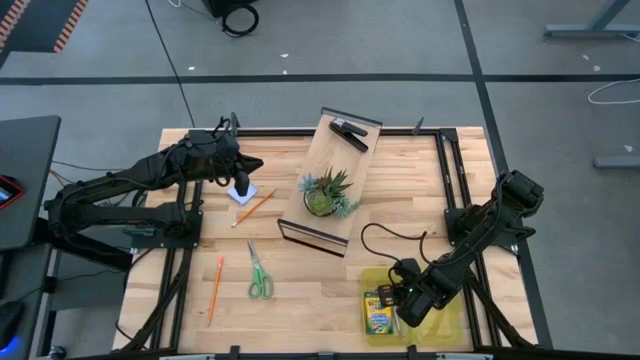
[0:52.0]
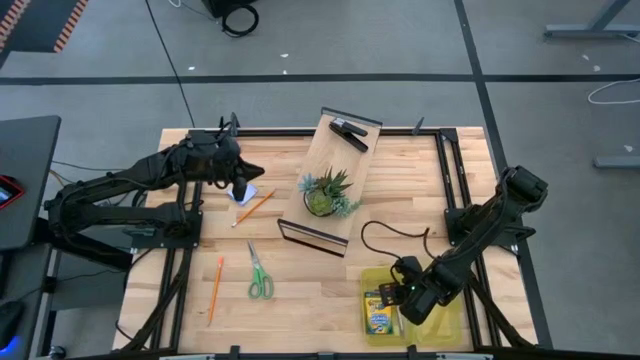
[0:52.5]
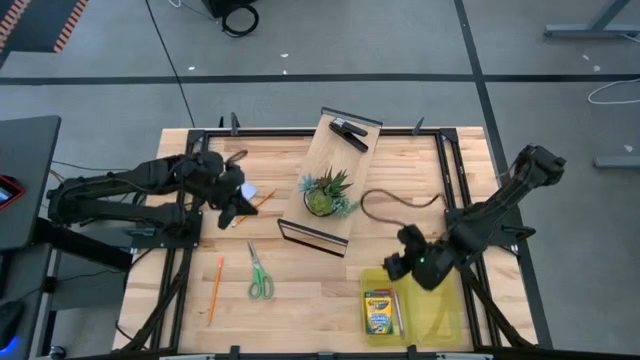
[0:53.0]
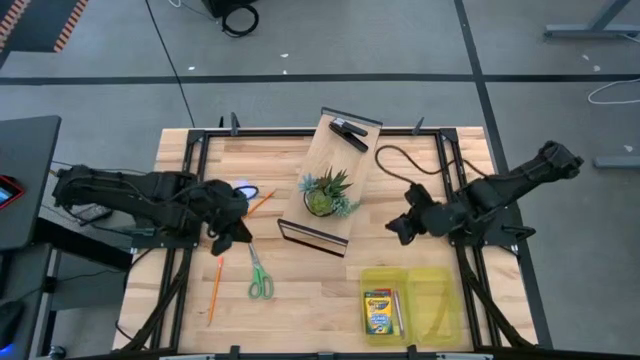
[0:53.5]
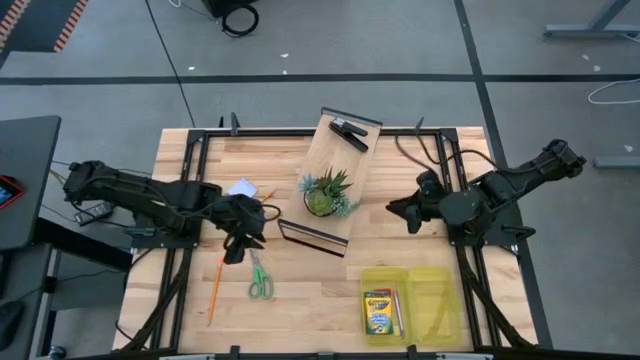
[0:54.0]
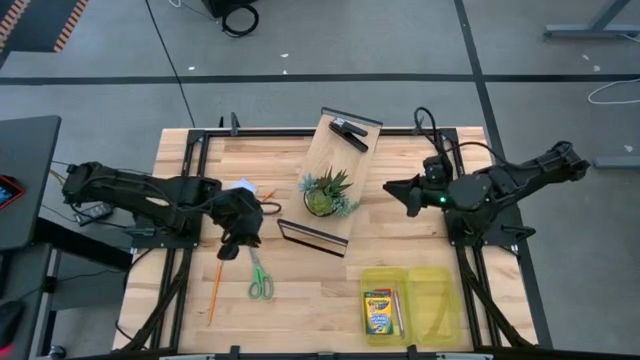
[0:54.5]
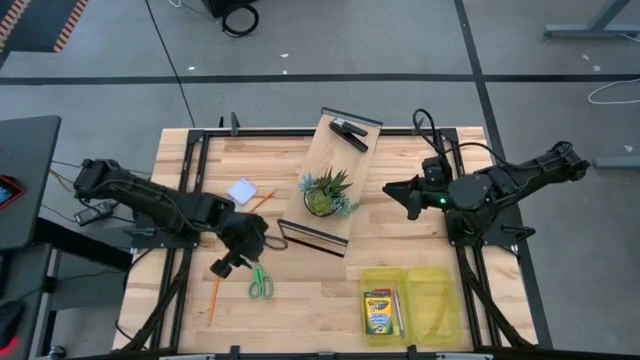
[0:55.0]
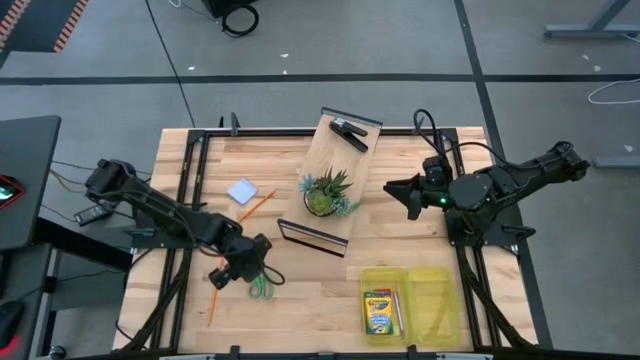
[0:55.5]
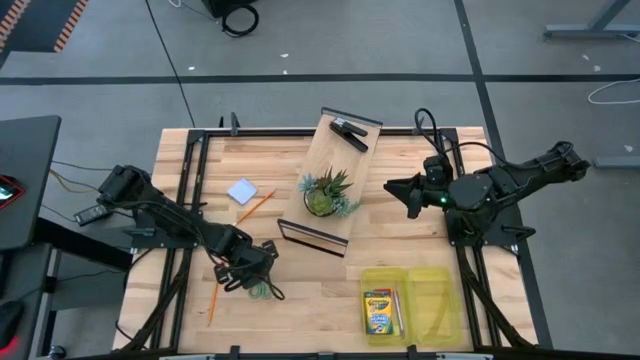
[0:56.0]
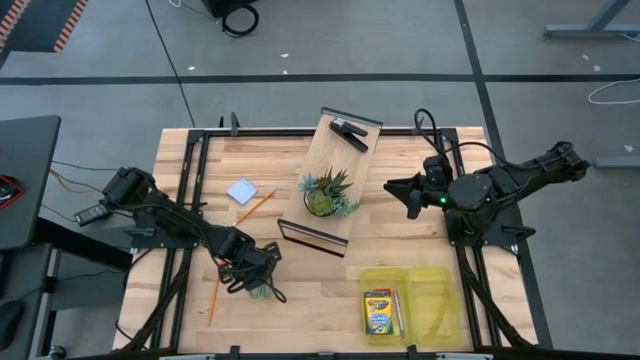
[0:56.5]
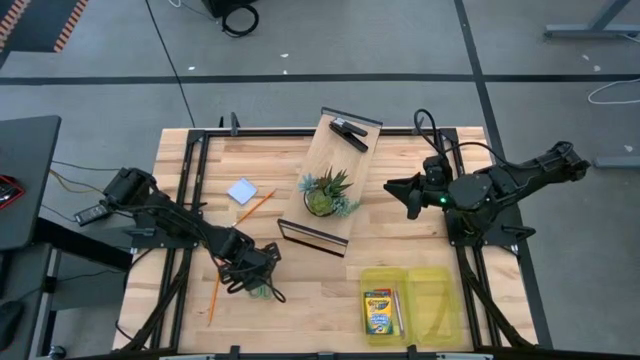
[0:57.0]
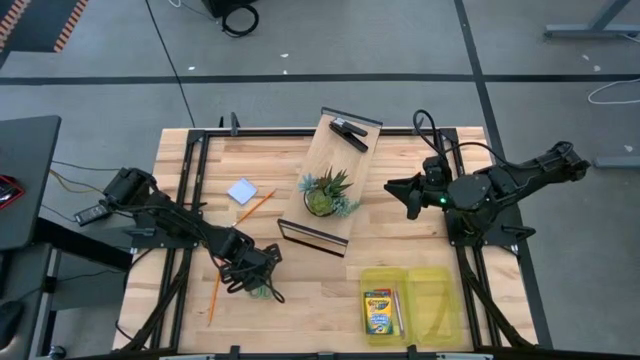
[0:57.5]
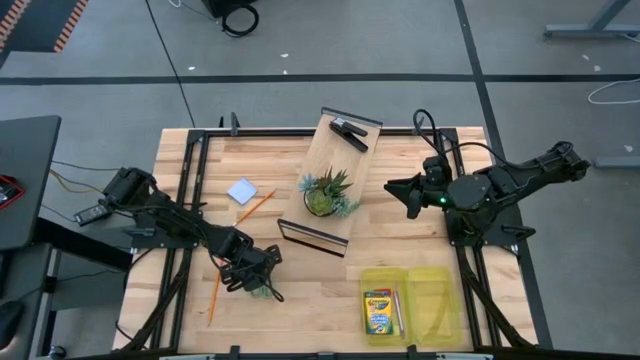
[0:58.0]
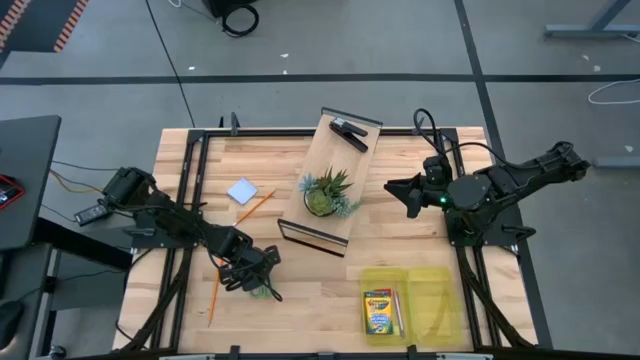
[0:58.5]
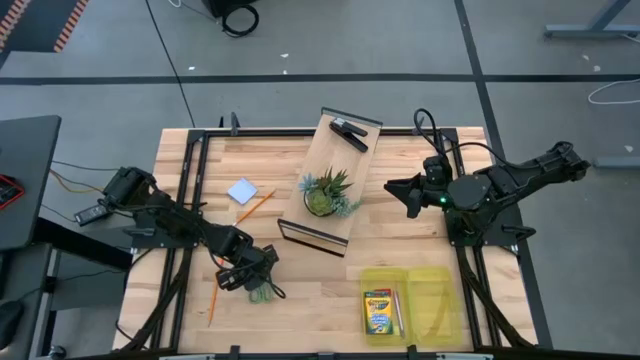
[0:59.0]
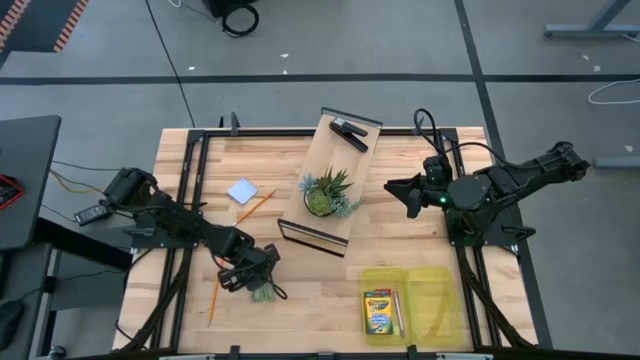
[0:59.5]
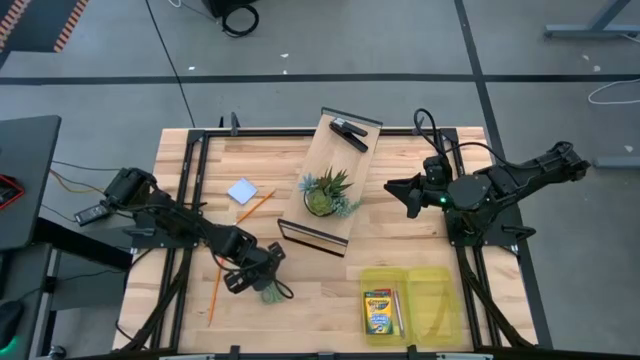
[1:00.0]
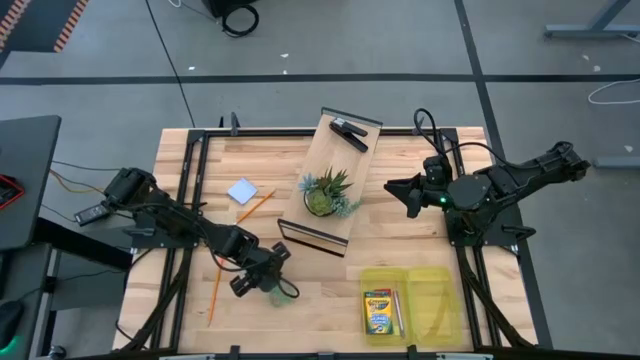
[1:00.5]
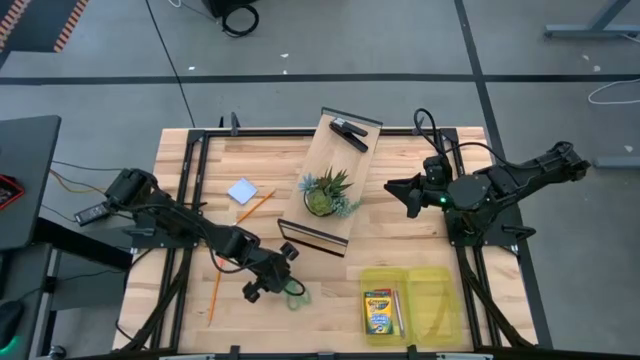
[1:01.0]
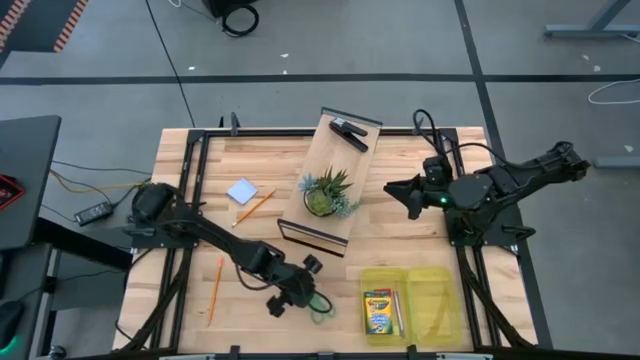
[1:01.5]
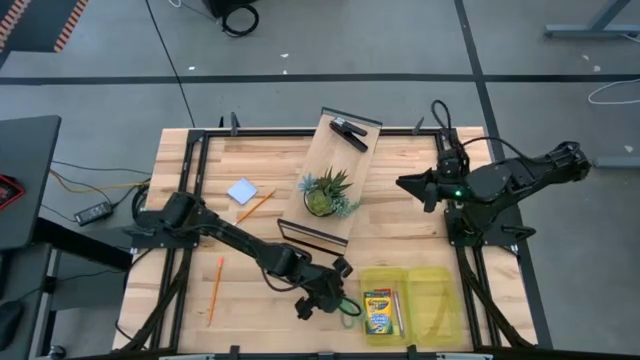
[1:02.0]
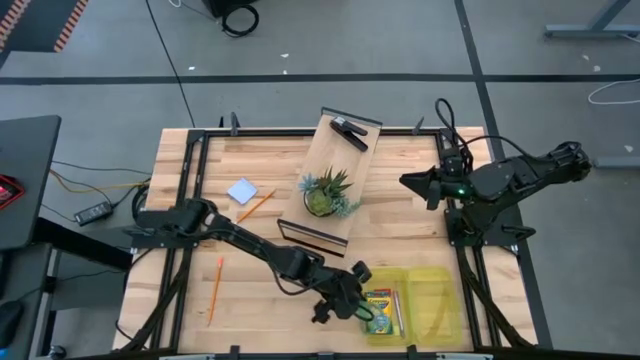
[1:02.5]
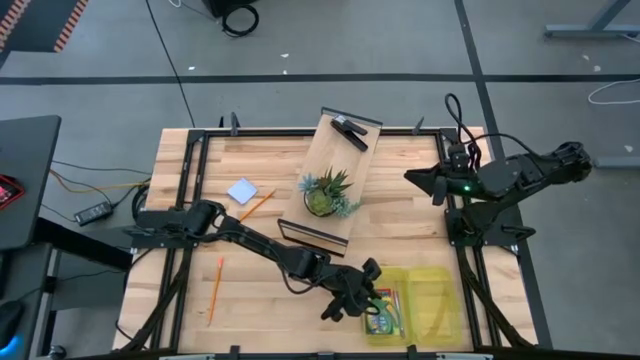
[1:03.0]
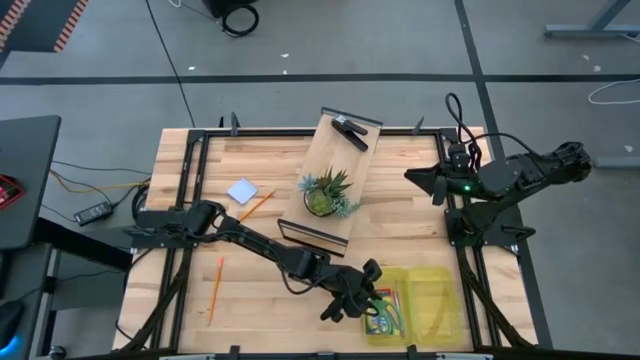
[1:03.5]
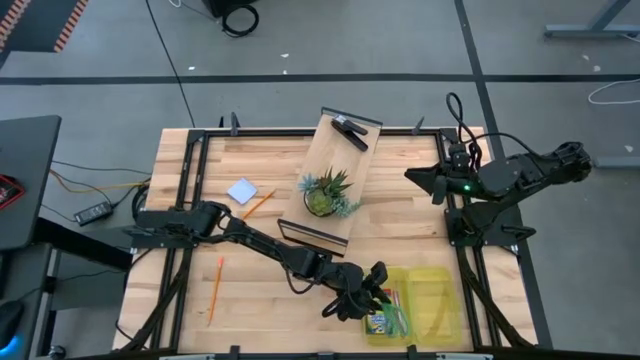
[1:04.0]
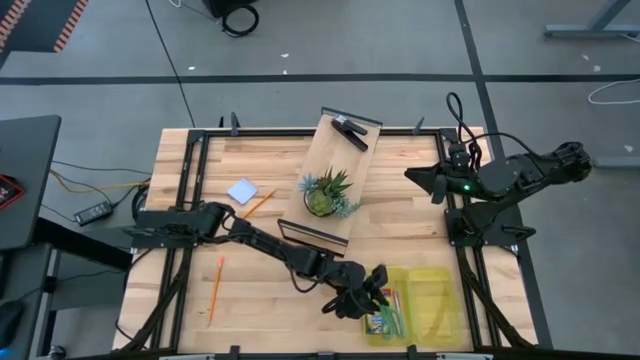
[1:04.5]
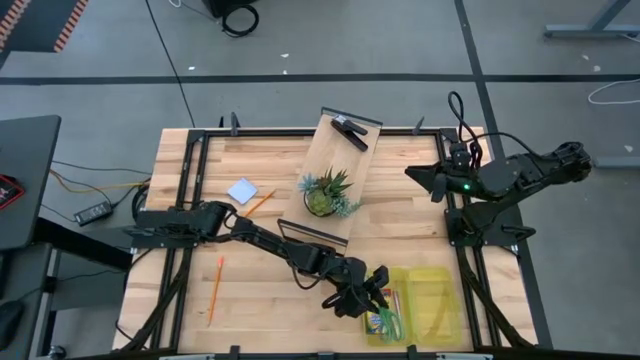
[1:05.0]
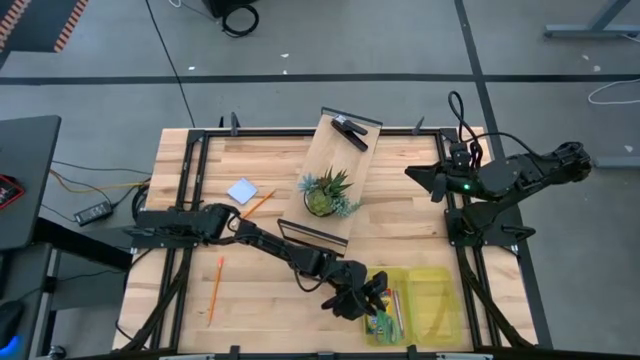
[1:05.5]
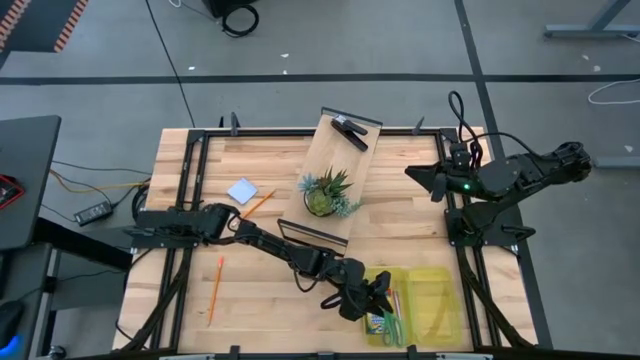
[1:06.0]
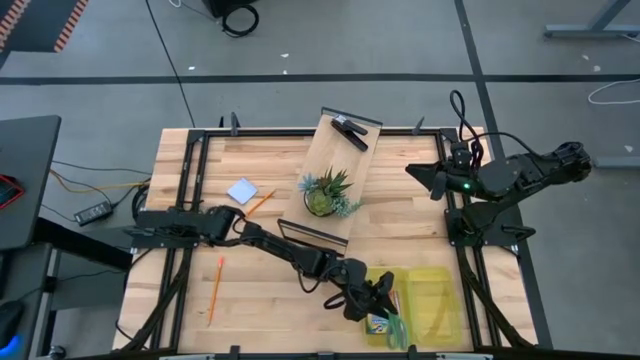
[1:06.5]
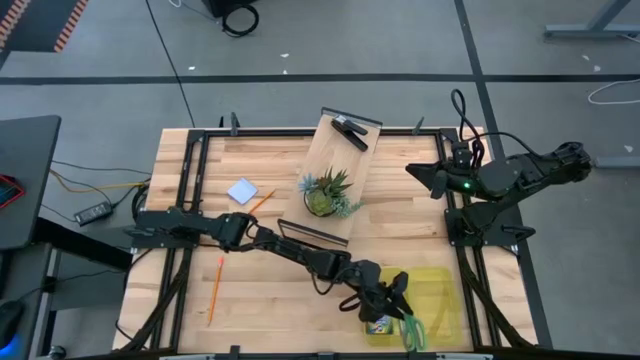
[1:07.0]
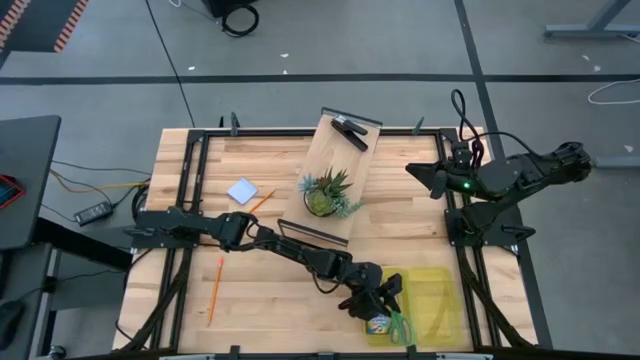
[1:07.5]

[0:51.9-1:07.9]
Task: Pack school essentials
Put the green scissor into the yellow supply box

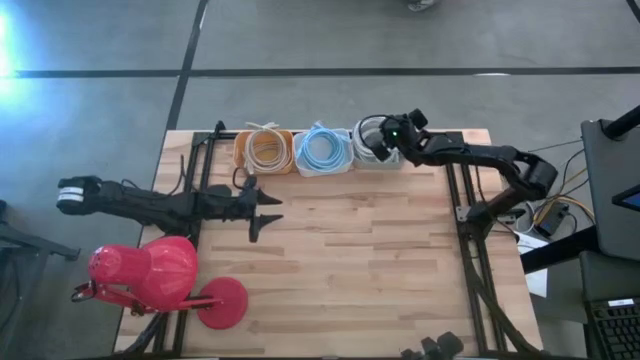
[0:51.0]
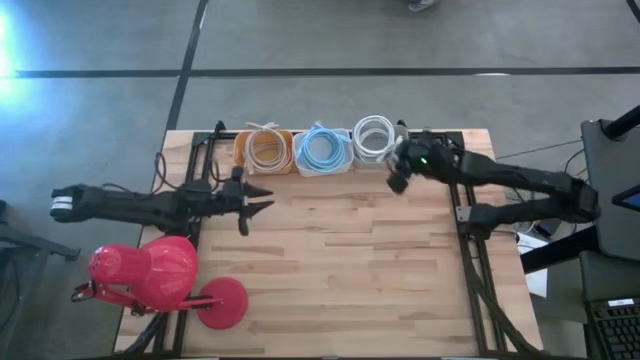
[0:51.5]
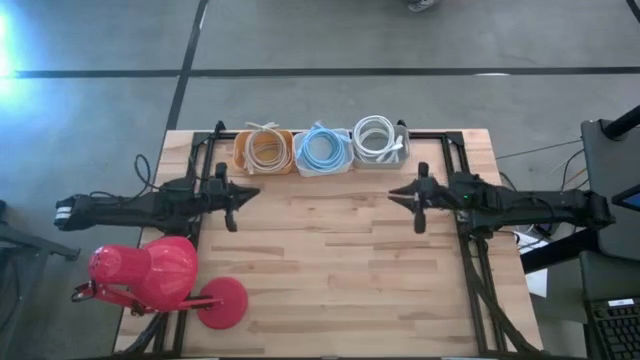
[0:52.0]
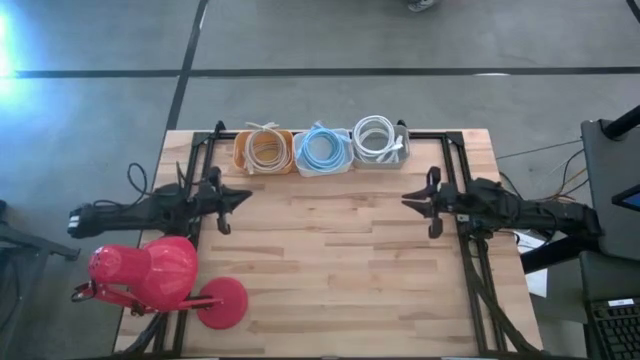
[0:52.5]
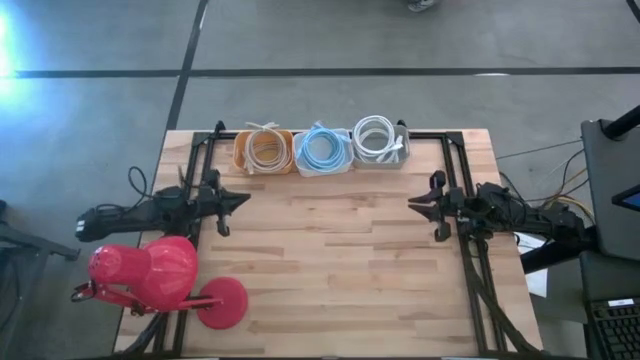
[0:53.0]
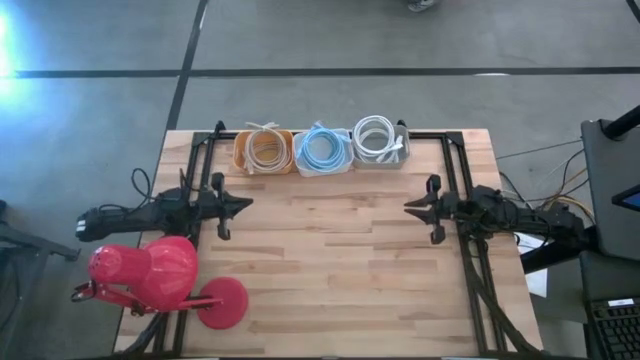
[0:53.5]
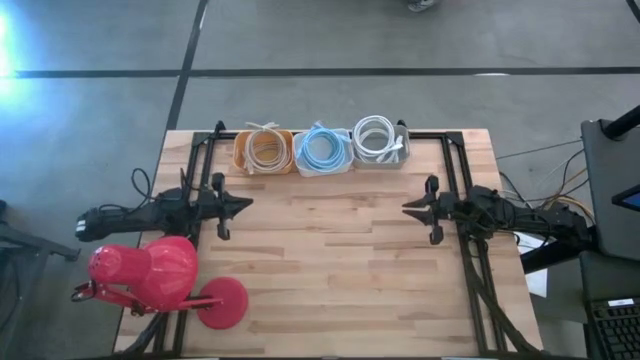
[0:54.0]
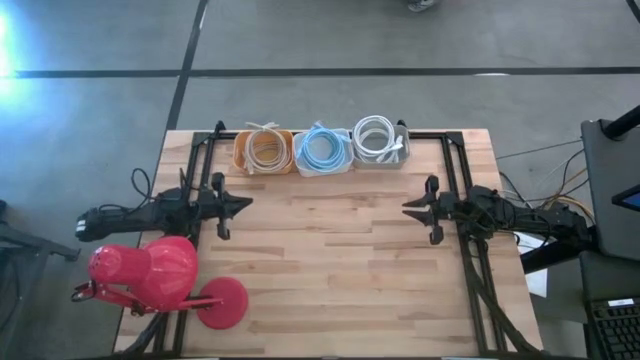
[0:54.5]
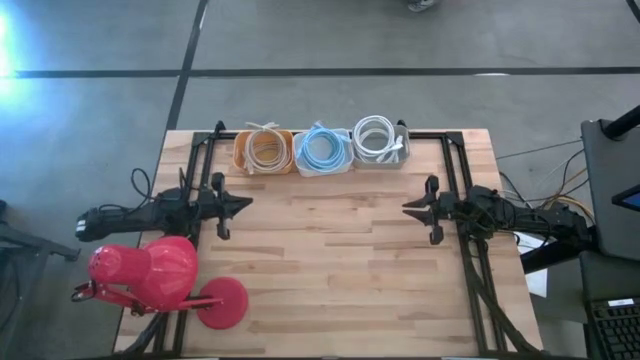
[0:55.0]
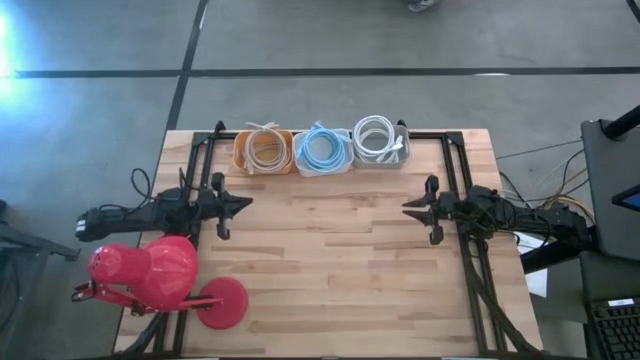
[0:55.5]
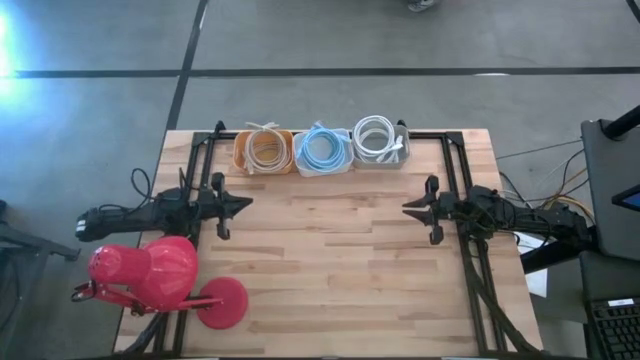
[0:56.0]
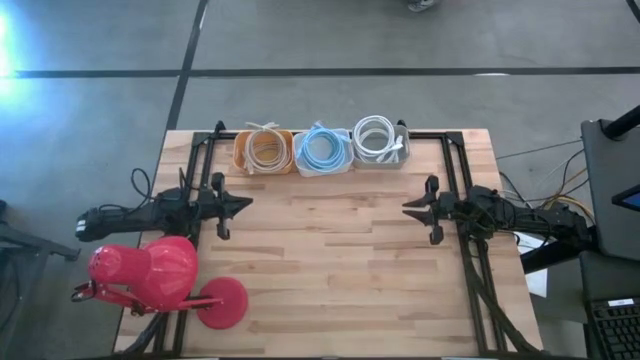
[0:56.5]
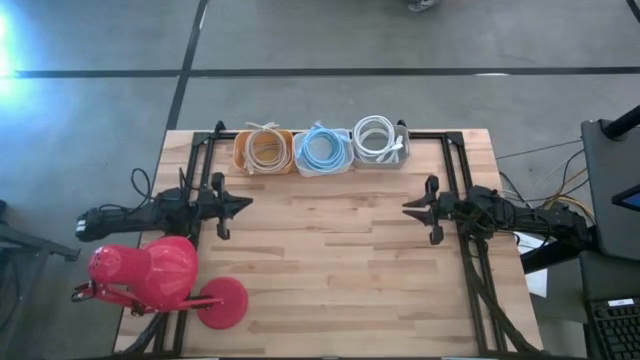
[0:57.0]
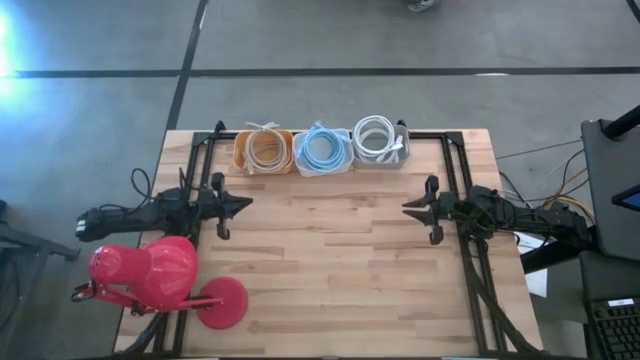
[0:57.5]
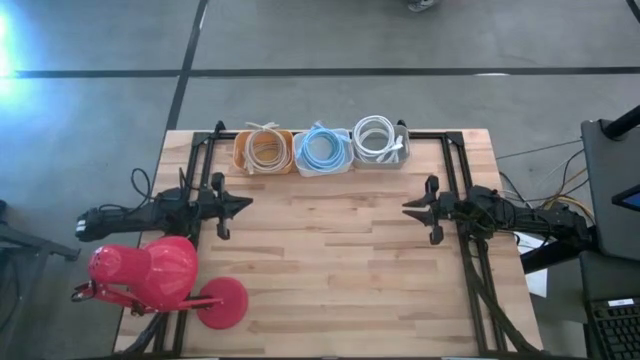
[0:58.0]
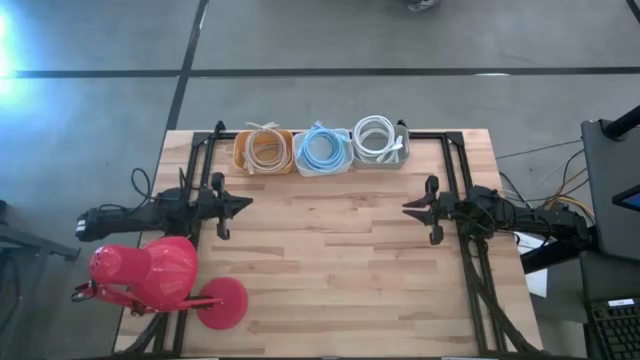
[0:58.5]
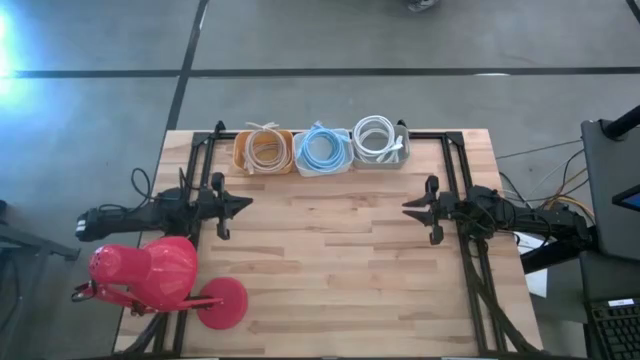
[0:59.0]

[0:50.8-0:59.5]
Task: Sort HDMI cables
Return to Home Position
